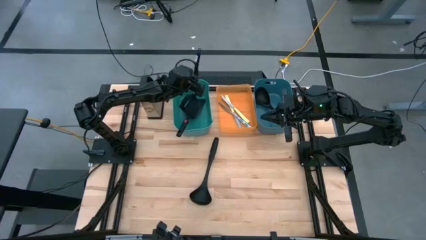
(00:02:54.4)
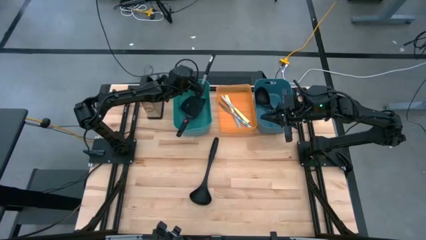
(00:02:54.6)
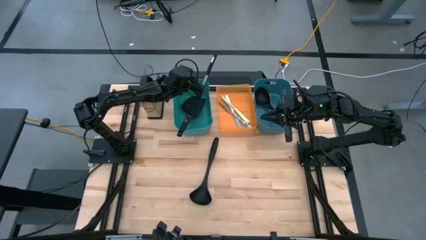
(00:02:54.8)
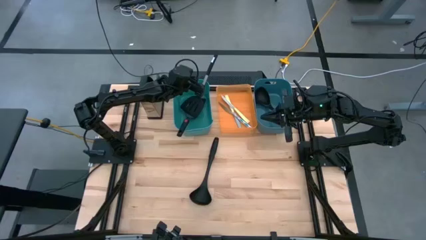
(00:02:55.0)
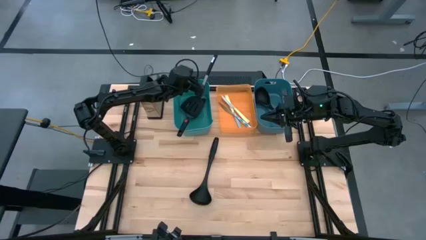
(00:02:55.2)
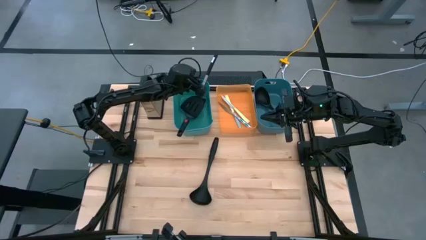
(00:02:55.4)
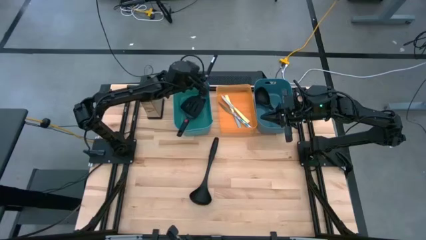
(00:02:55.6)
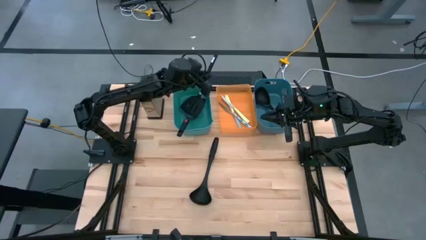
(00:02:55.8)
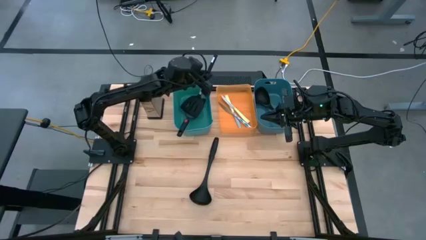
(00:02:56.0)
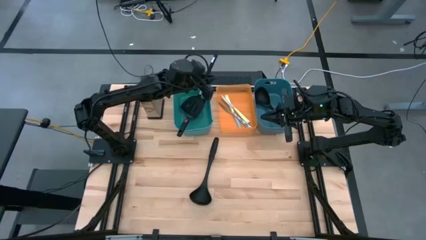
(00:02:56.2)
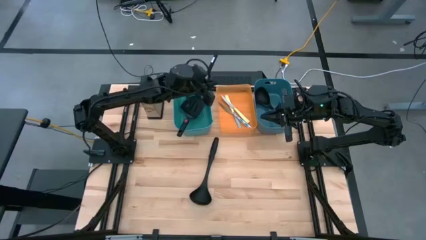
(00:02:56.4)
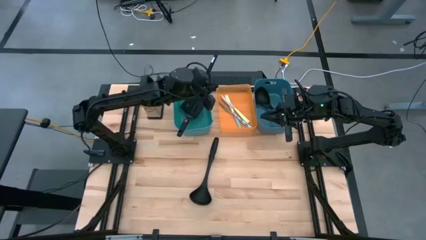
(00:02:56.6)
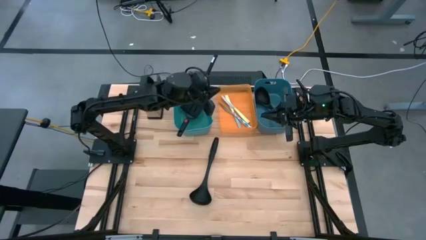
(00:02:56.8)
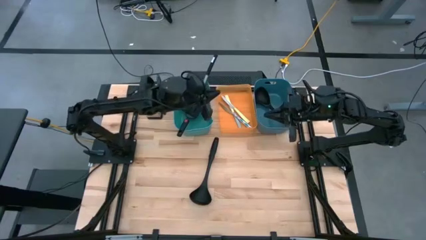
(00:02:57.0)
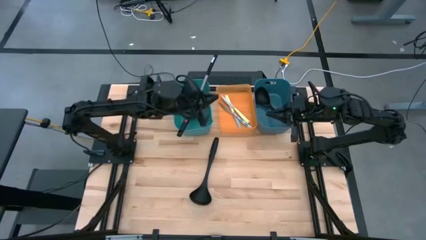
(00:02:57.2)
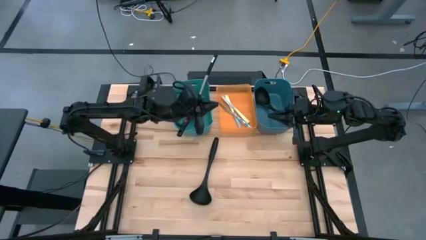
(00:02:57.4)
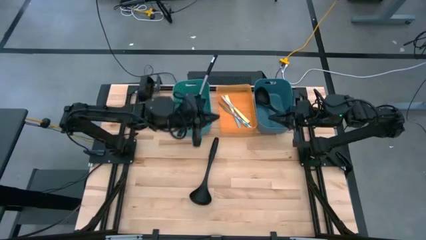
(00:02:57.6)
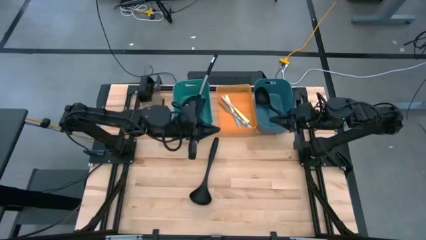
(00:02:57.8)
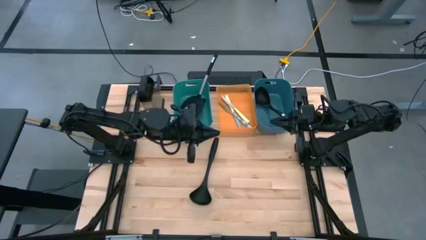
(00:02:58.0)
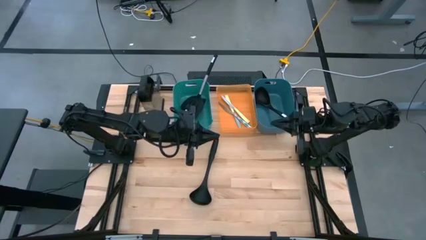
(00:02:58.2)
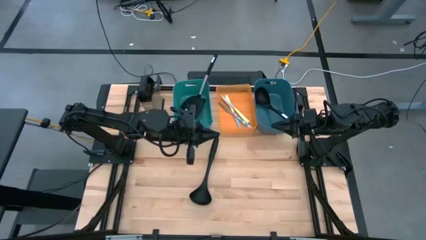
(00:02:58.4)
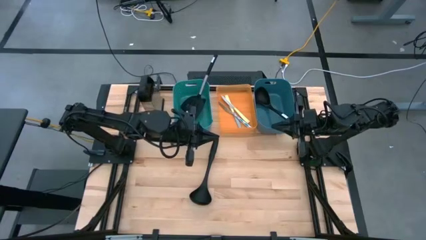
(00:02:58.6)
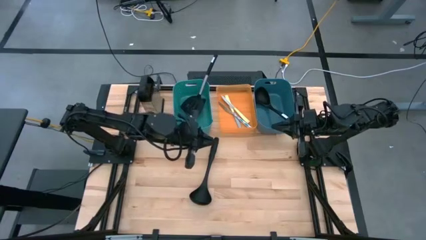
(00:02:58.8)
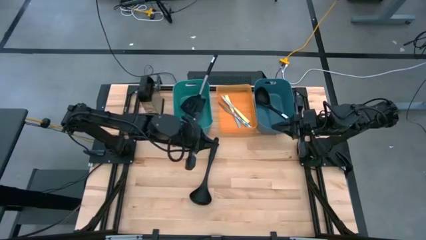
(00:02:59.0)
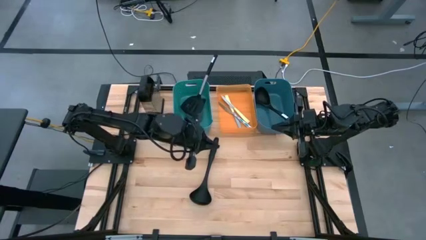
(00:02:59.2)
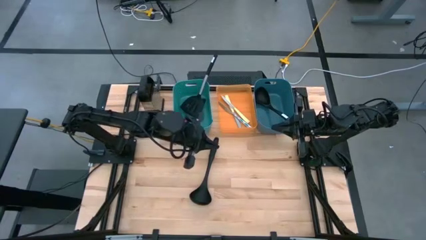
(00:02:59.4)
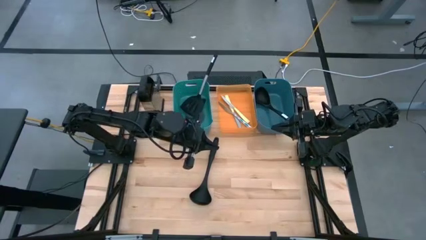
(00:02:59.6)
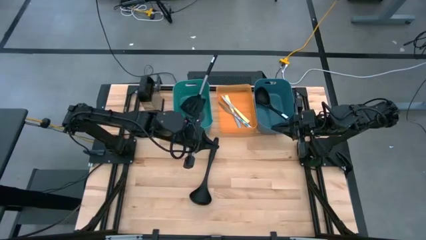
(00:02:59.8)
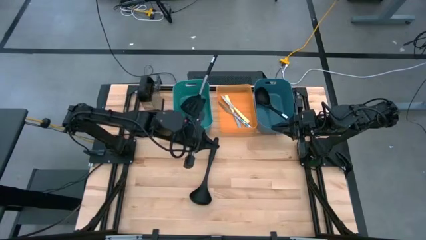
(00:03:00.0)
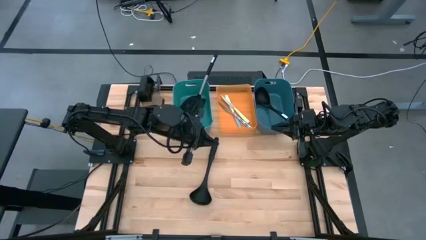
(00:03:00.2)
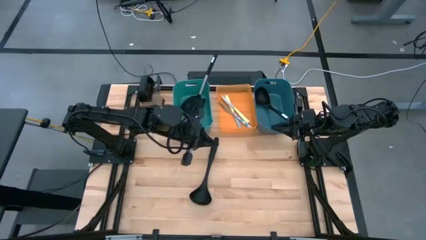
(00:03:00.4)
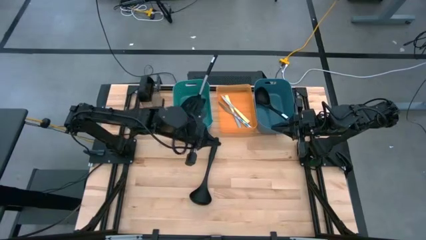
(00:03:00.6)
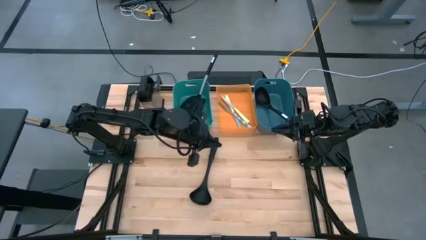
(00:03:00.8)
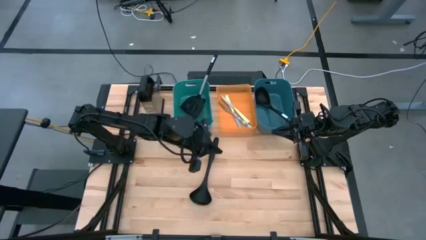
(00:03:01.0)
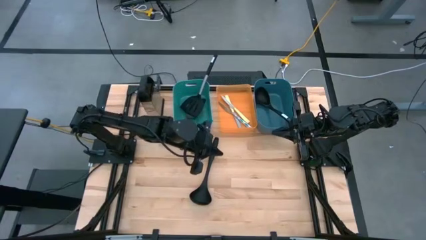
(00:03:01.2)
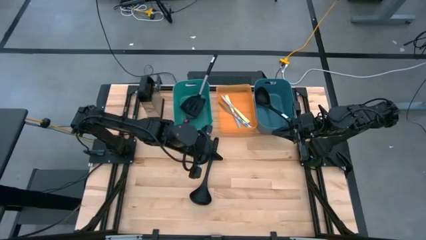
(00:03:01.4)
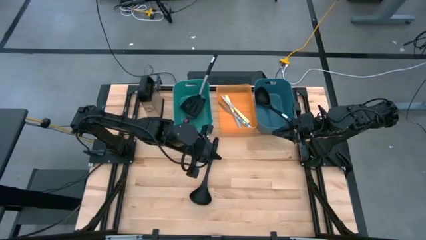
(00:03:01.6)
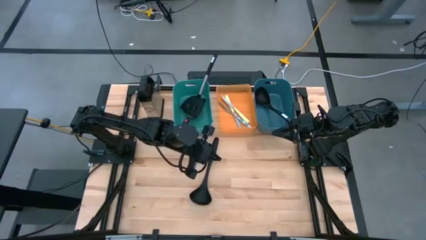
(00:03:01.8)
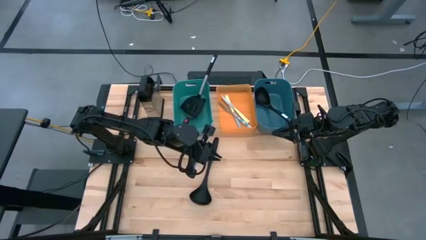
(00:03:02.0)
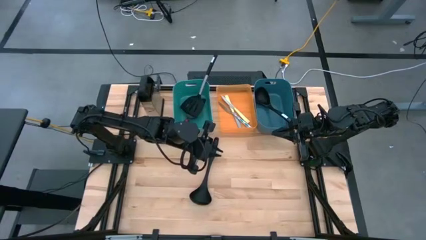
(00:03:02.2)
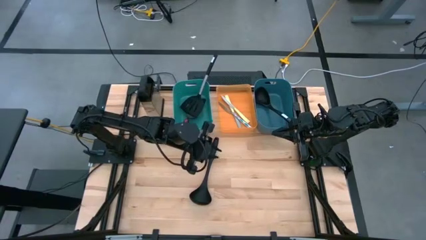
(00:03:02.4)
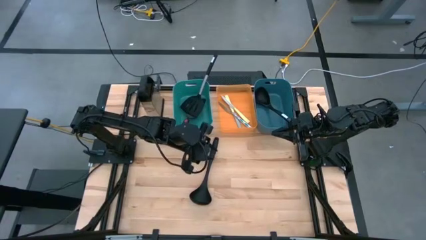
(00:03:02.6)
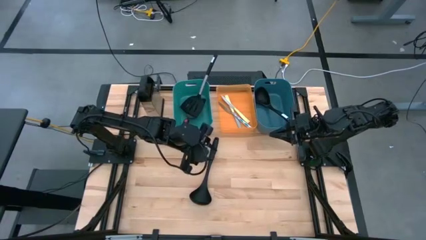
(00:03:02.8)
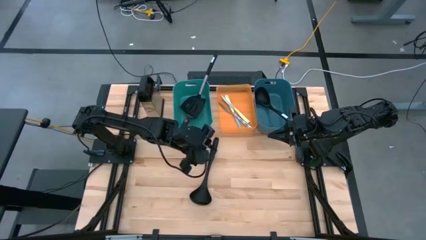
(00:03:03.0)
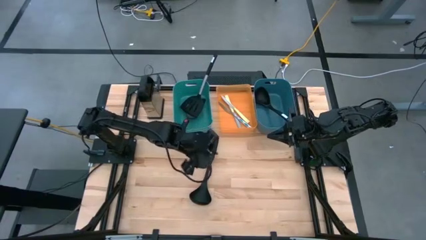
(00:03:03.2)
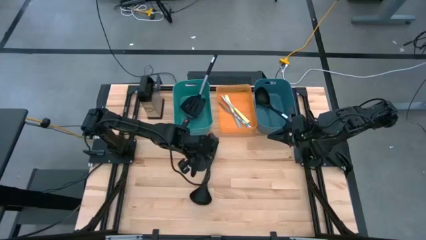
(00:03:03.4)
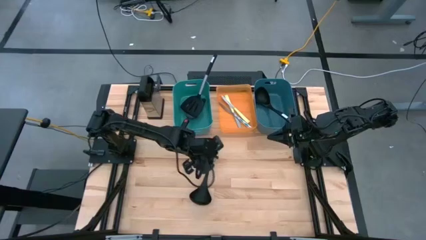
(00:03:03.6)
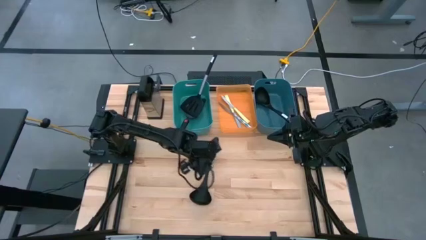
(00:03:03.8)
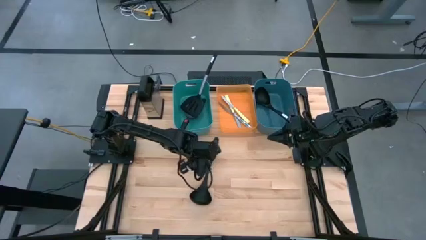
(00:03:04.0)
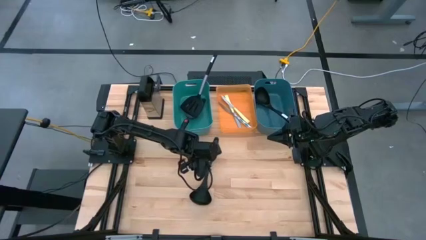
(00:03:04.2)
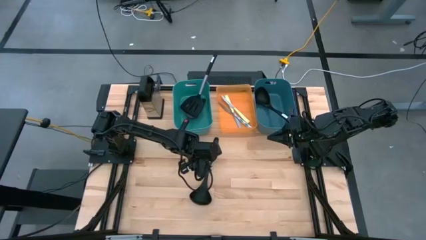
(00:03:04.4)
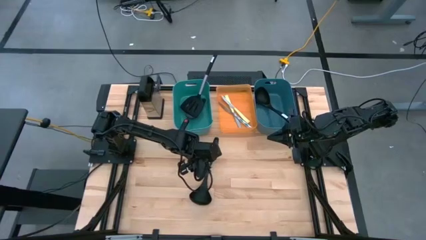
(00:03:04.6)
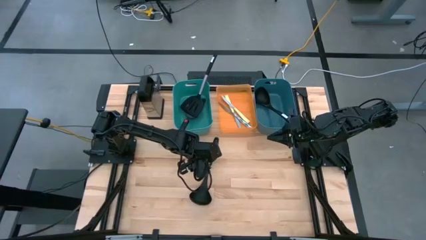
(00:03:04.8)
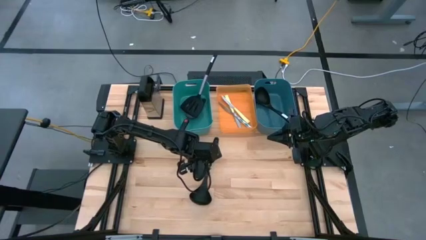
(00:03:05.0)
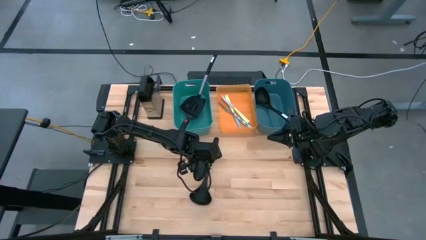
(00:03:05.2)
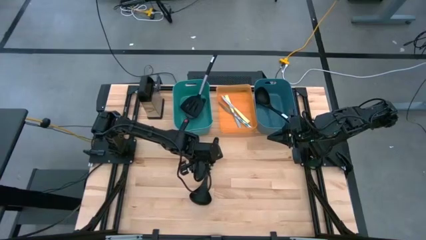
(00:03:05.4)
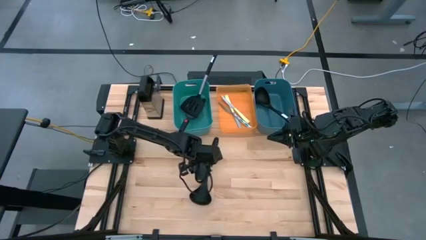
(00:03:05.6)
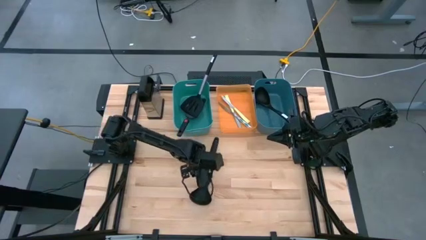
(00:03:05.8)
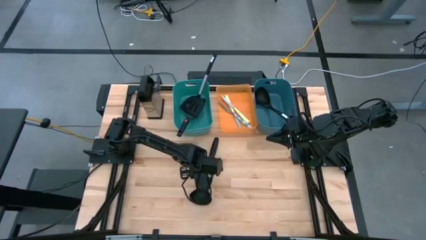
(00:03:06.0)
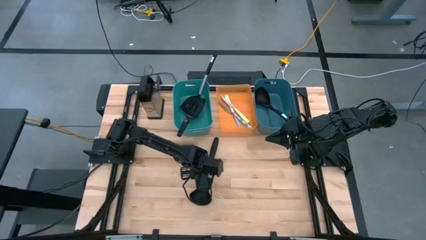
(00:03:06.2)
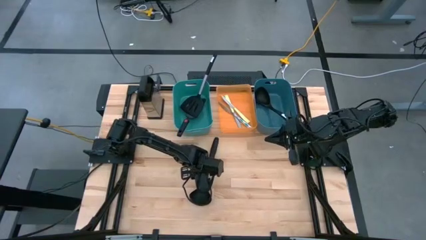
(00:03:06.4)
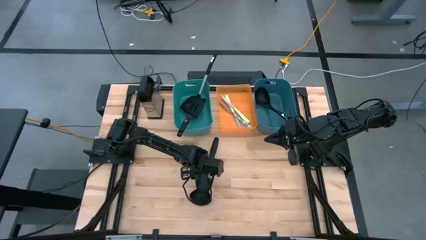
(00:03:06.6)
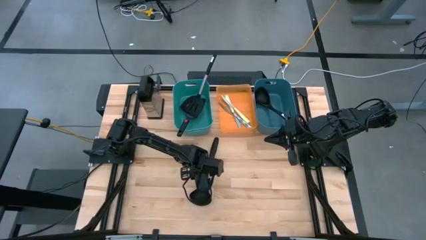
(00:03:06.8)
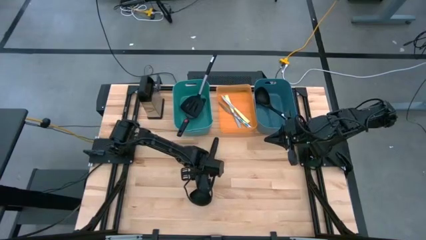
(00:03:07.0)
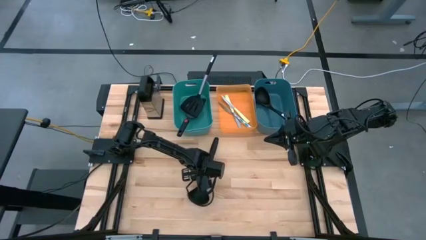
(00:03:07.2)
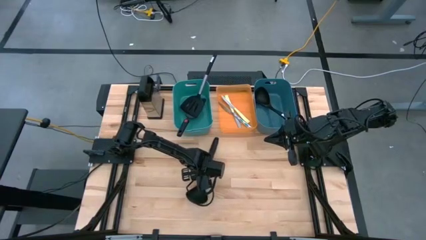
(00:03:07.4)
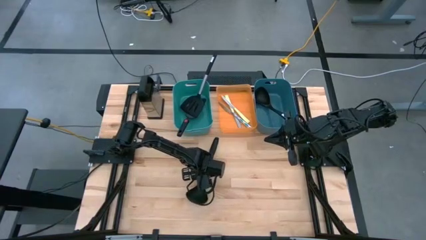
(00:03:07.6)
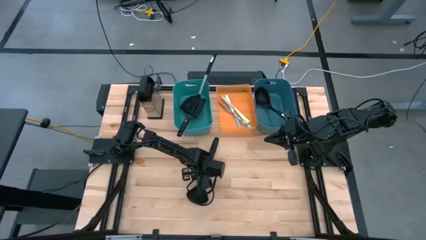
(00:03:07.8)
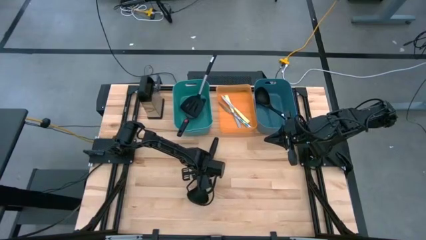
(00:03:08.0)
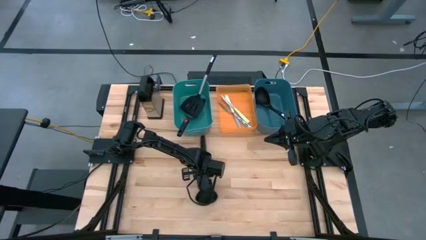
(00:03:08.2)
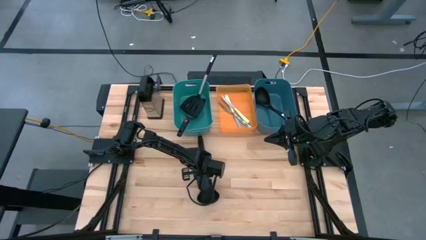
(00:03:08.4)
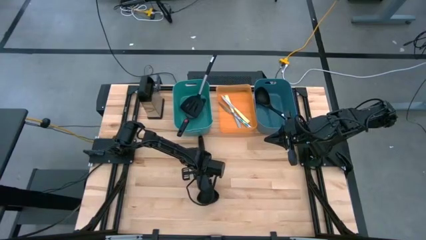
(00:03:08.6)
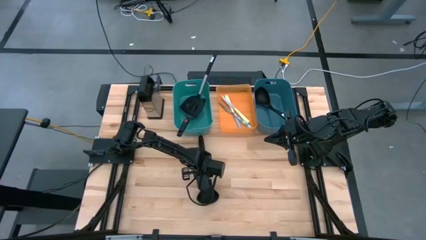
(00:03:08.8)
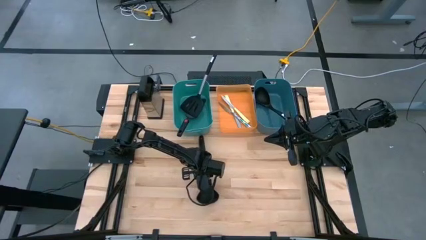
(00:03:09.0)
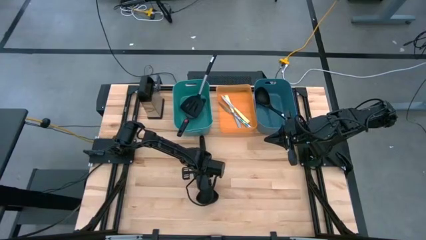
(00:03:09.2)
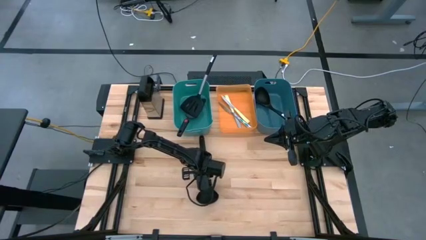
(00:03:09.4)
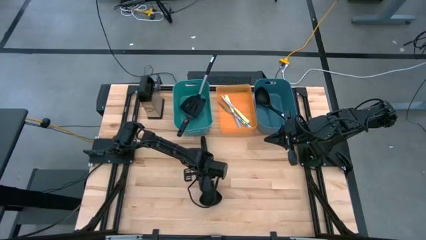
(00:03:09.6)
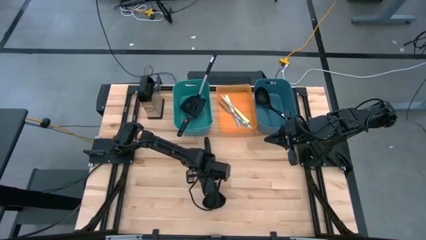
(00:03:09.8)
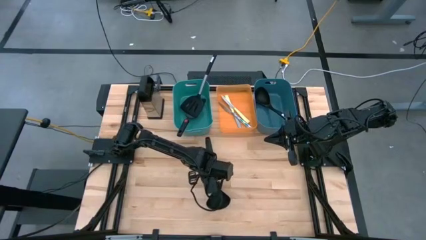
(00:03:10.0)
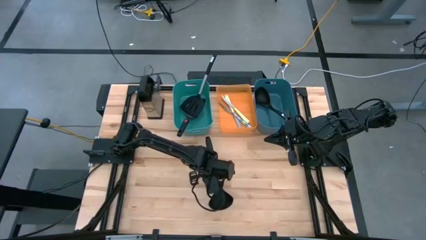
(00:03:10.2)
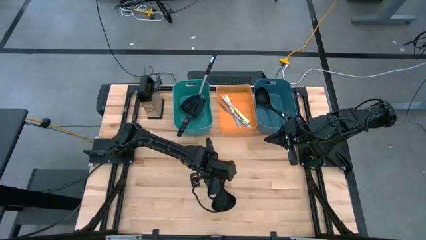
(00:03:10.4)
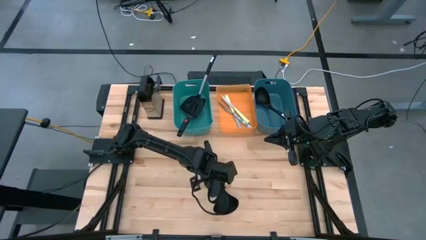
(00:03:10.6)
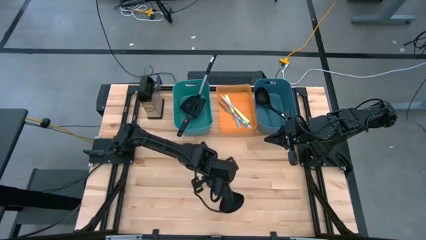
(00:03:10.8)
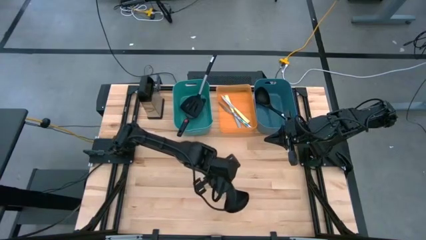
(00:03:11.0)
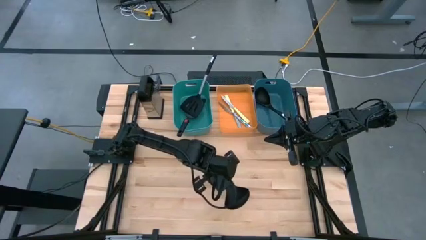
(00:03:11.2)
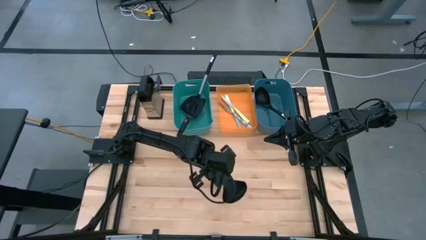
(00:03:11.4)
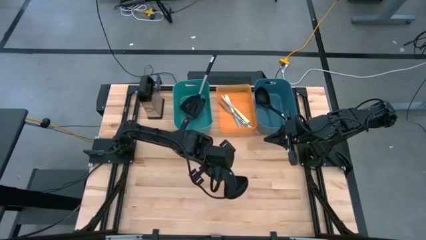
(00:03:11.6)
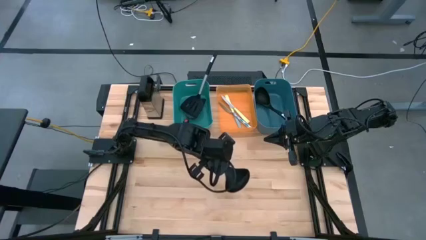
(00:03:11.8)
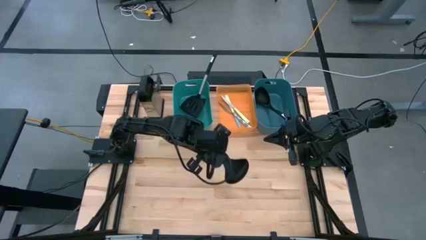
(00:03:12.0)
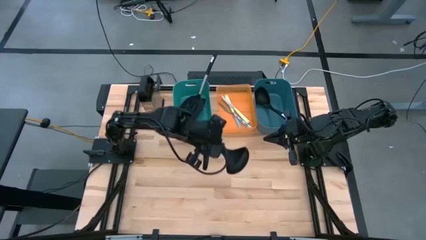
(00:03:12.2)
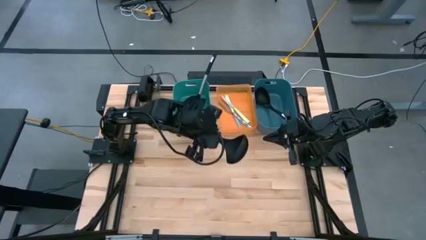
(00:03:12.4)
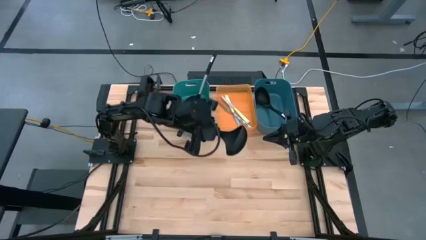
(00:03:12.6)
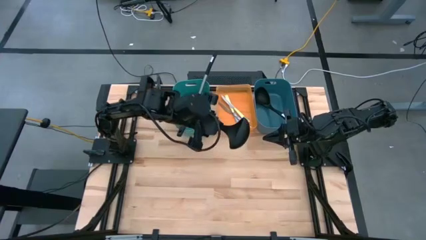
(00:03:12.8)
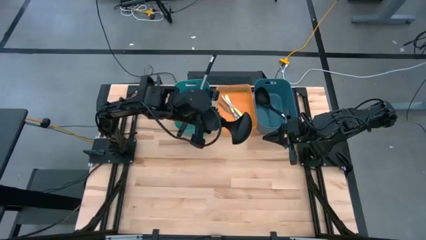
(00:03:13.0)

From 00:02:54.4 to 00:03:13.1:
Task: Pick & Place Kitchen Items
Put the black ladle into the blue bin
